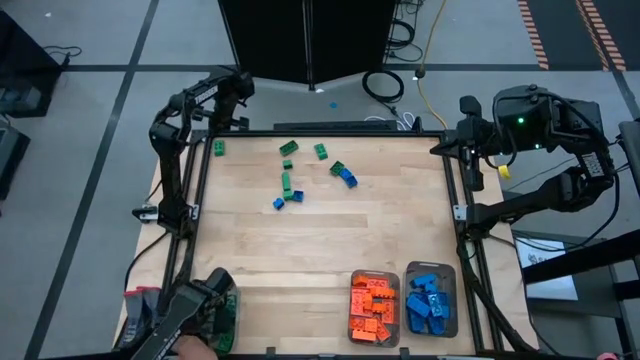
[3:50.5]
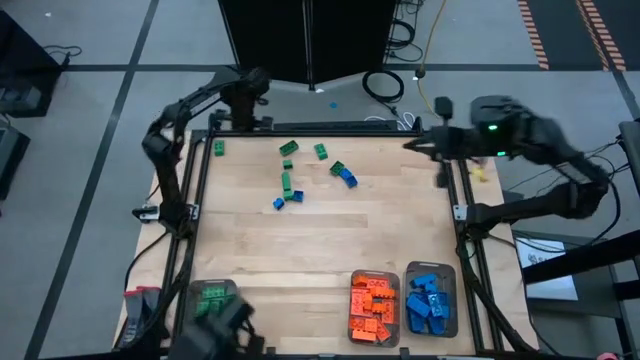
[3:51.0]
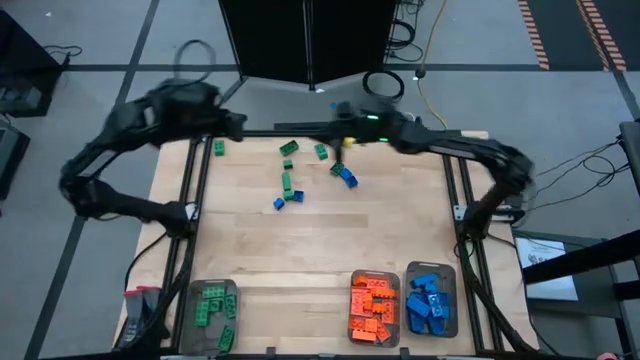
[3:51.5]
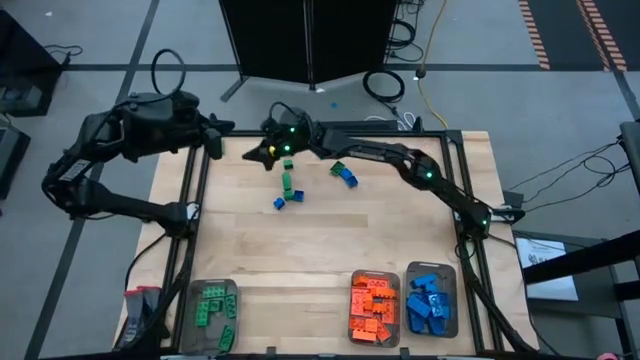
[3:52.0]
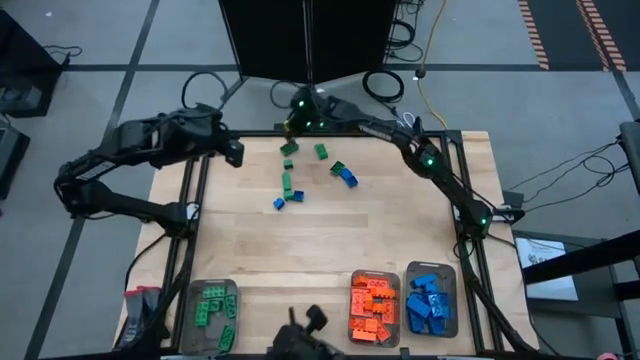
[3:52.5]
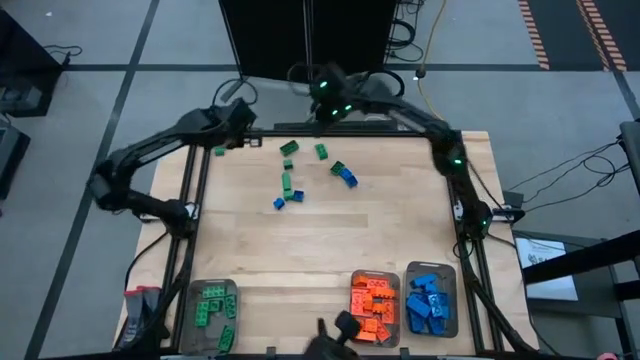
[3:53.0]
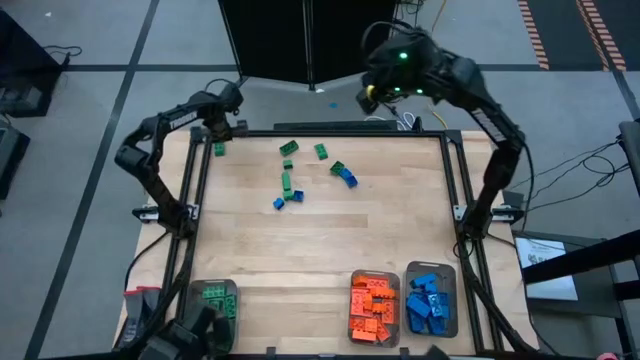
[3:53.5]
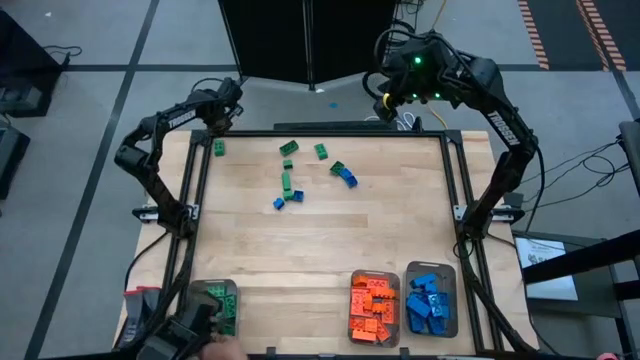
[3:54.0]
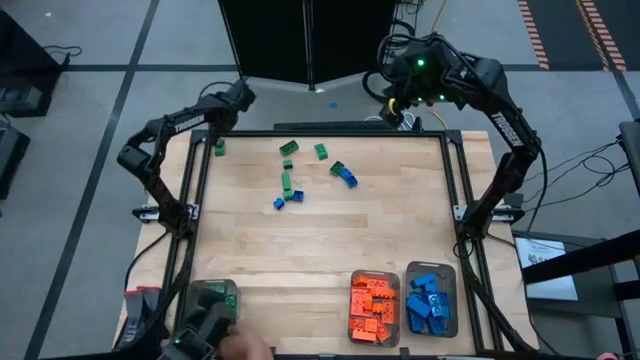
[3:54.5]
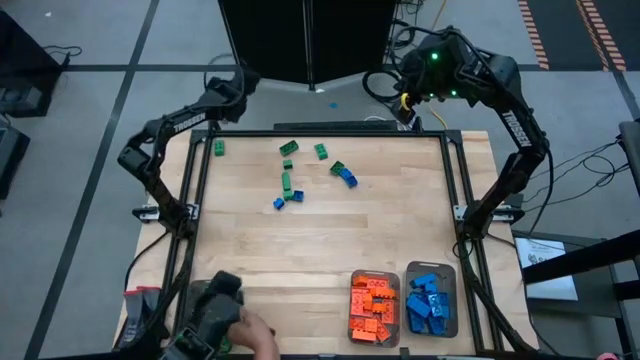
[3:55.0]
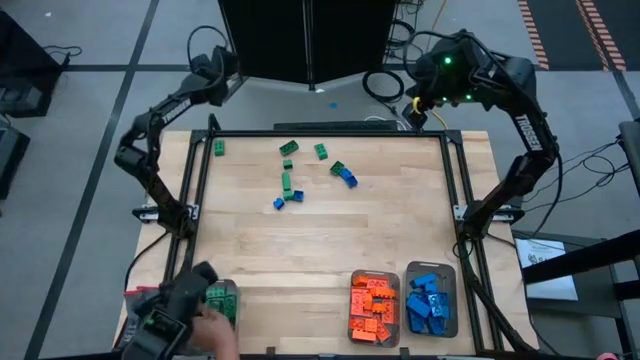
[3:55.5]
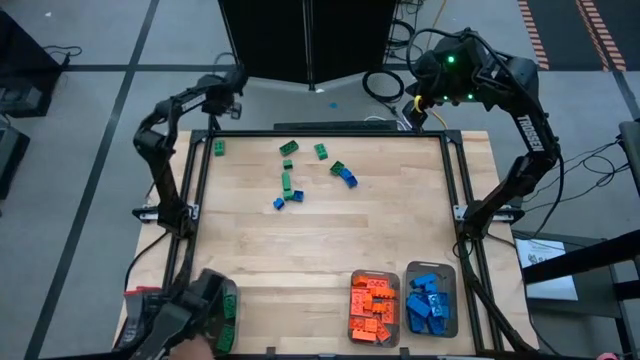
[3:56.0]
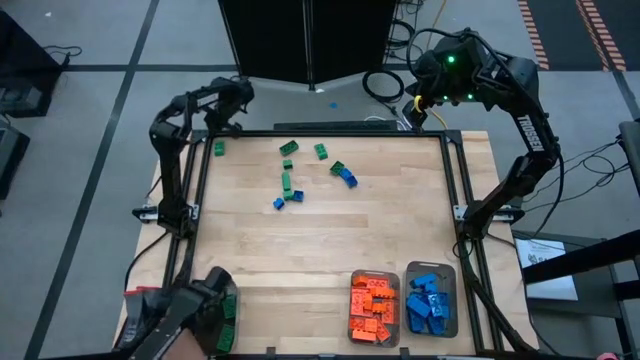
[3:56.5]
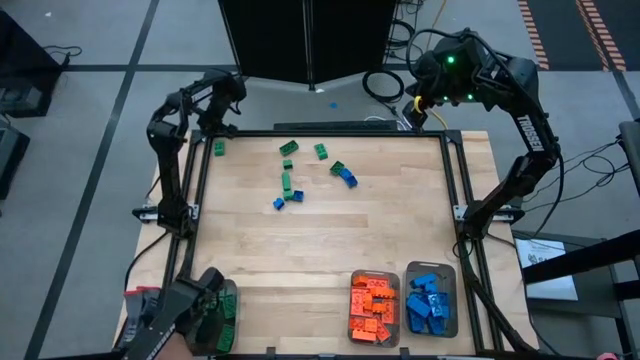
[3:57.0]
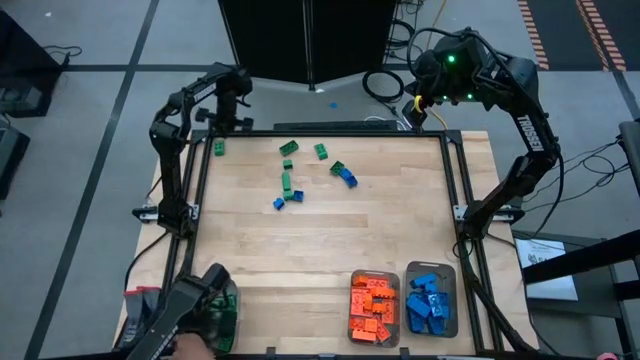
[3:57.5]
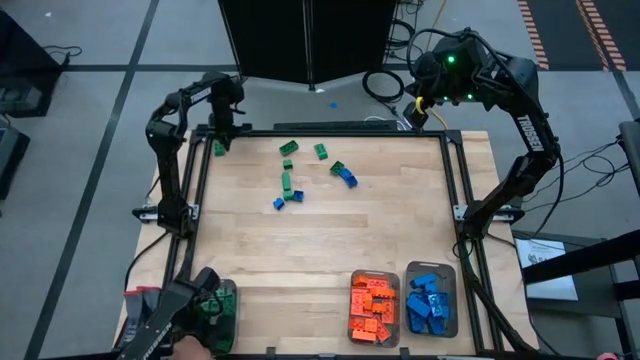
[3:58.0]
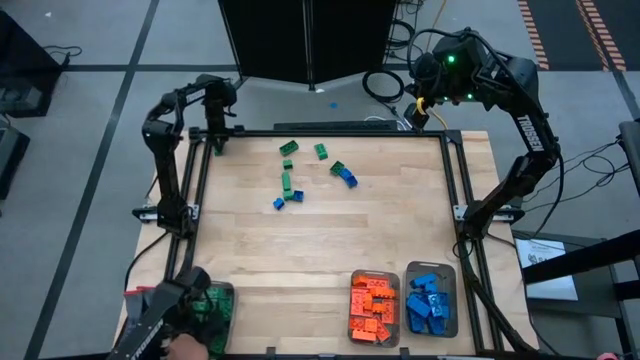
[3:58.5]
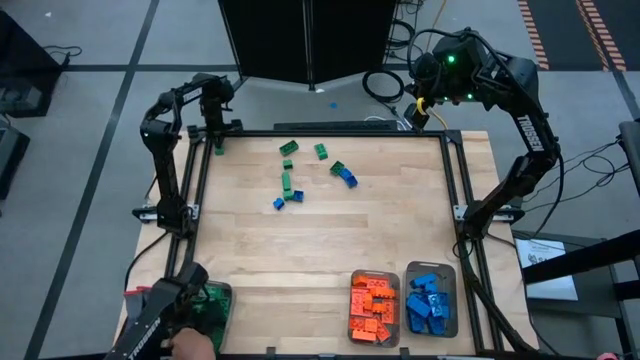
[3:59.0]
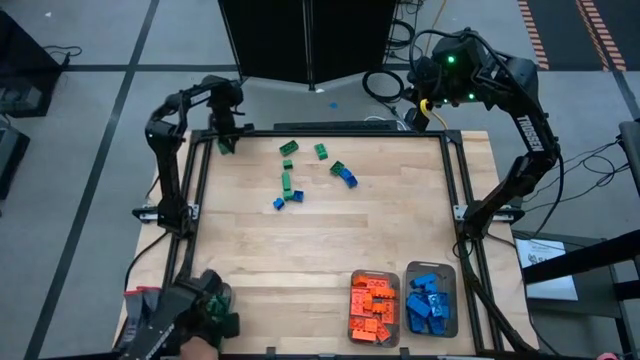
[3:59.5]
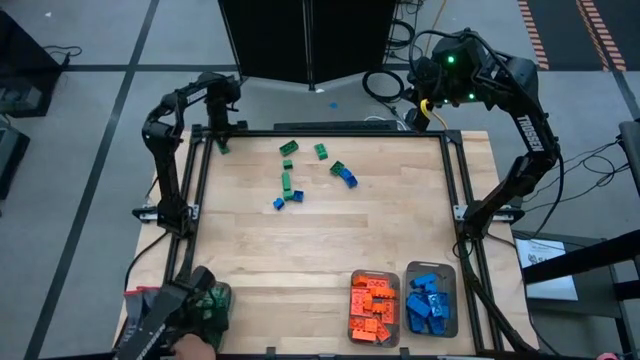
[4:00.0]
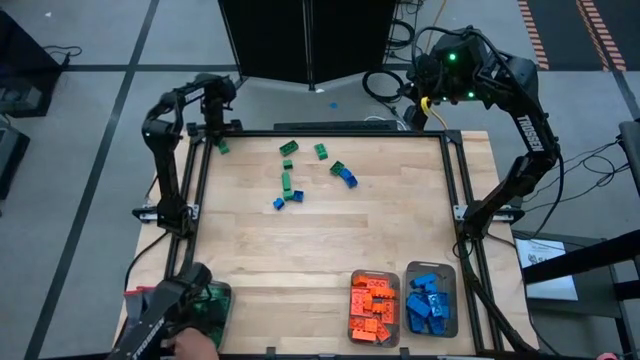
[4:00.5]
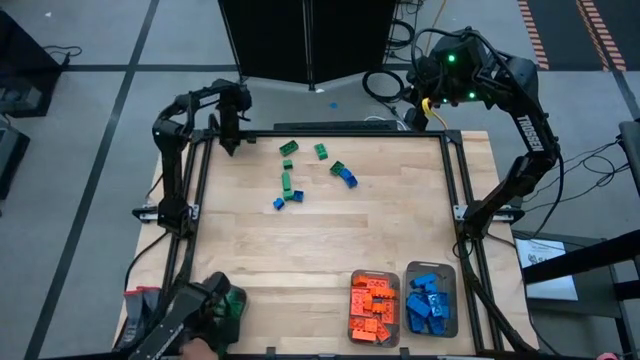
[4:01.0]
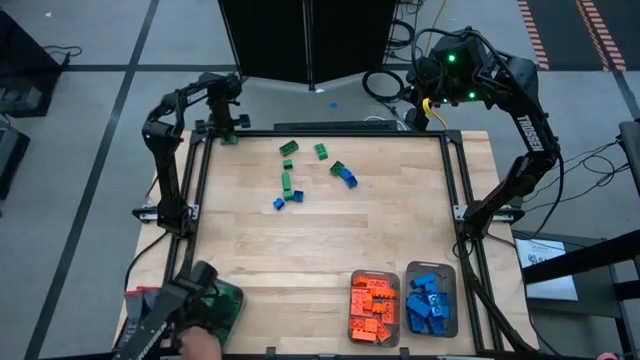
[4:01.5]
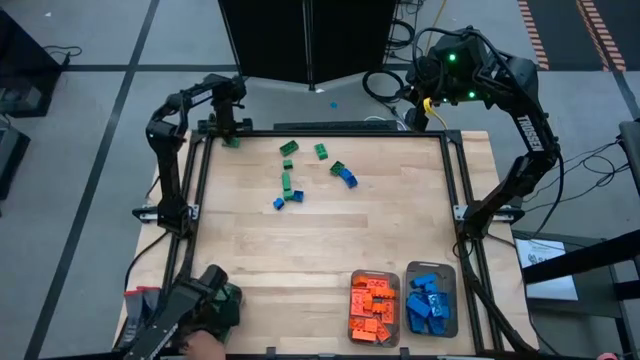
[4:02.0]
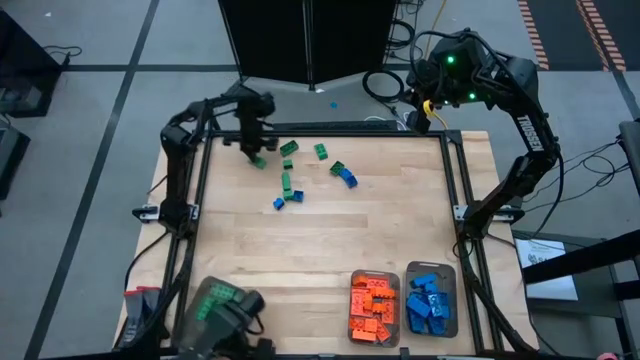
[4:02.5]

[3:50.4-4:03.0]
Task: Sort blocks
Move the green game piece to the center

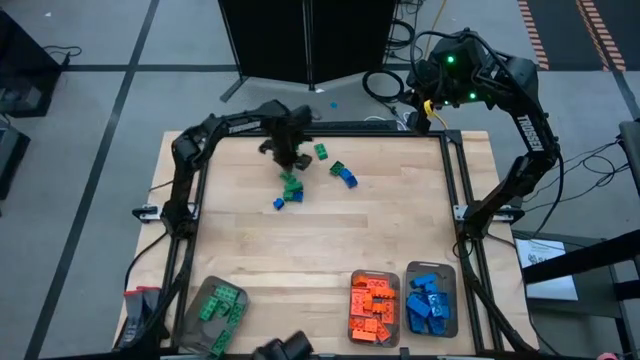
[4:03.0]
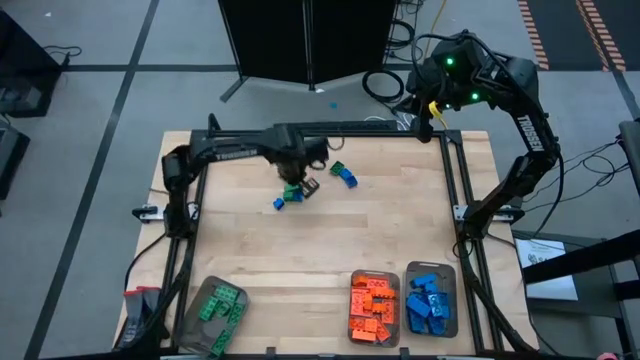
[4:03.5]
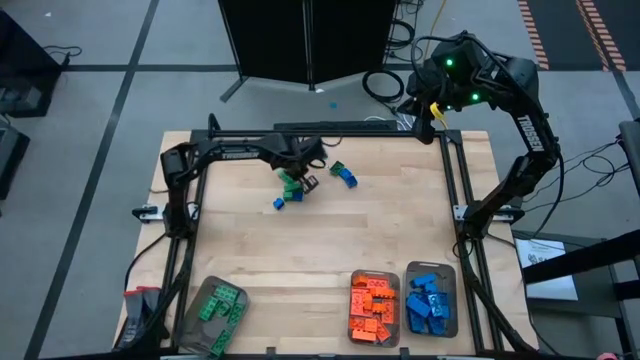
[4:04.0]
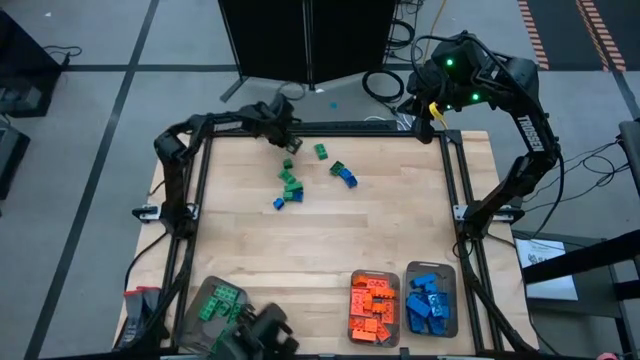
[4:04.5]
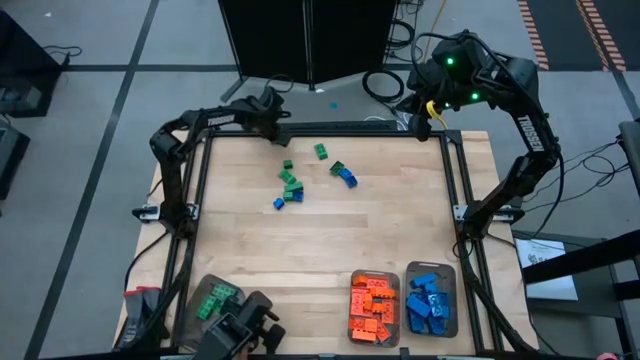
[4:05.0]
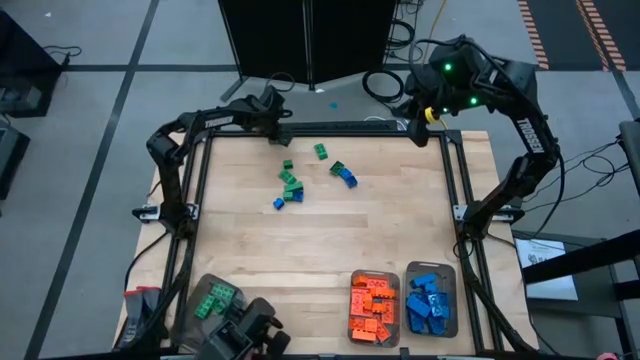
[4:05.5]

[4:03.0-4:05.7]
Put the green game piece into the left black bin
